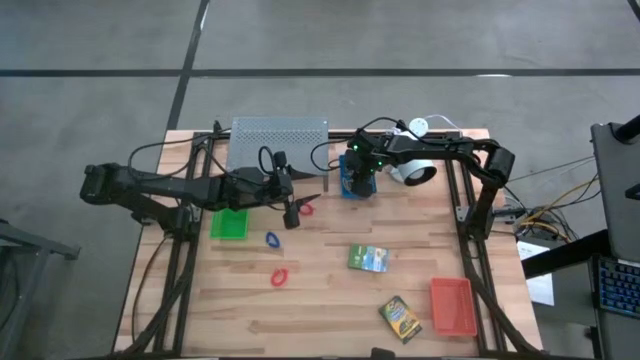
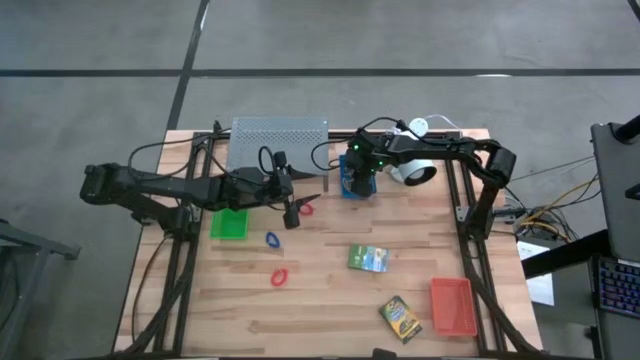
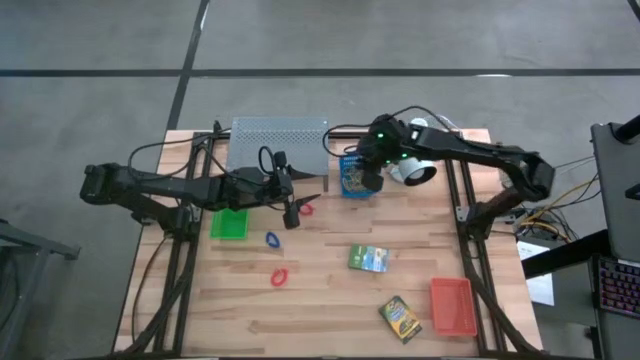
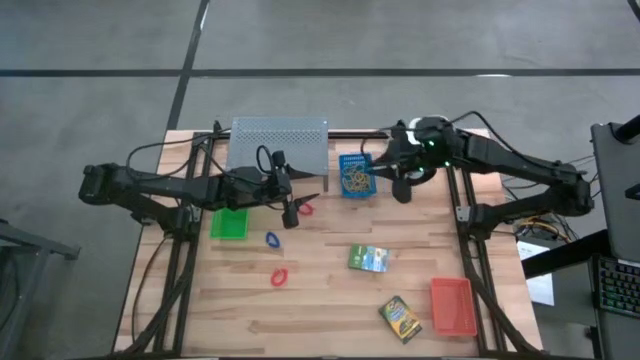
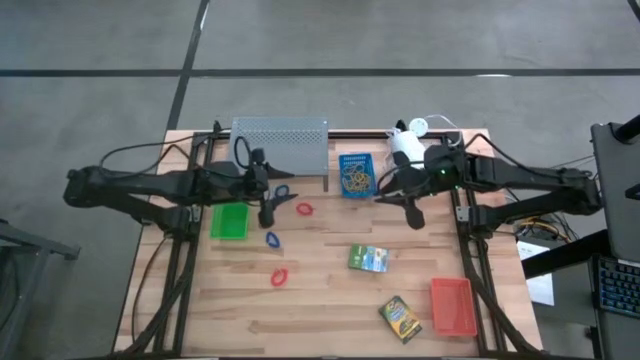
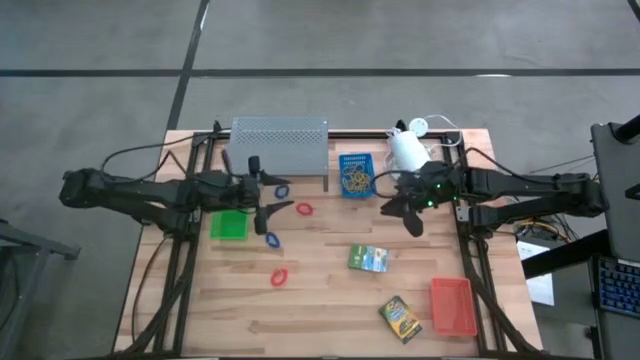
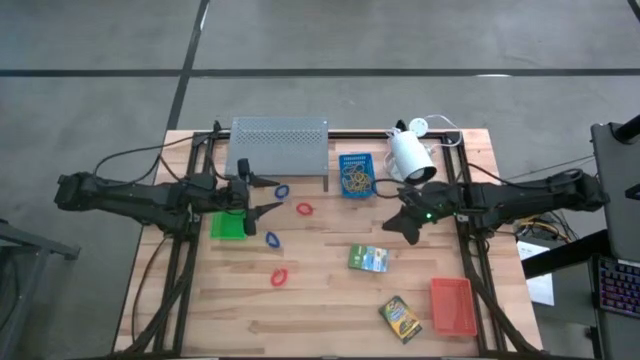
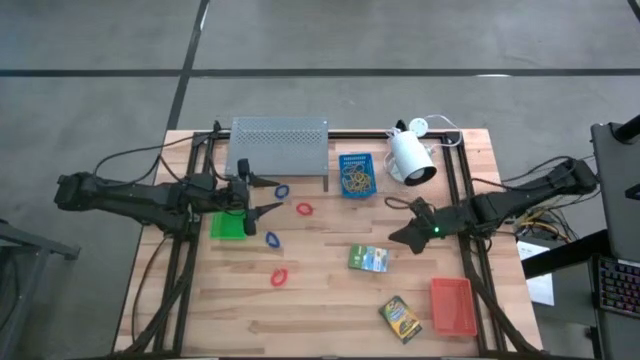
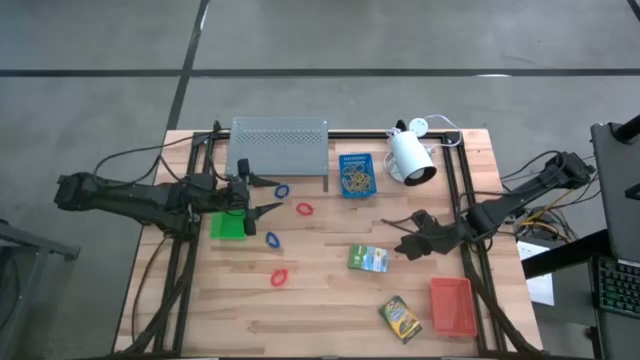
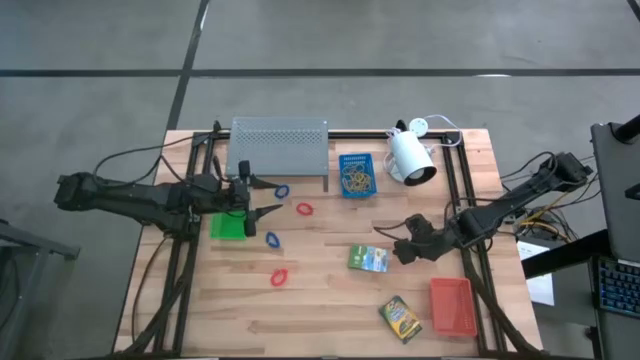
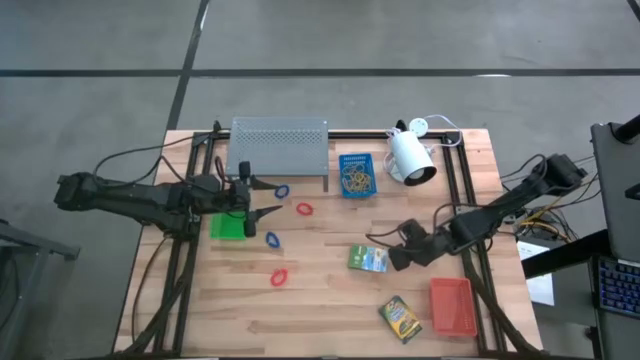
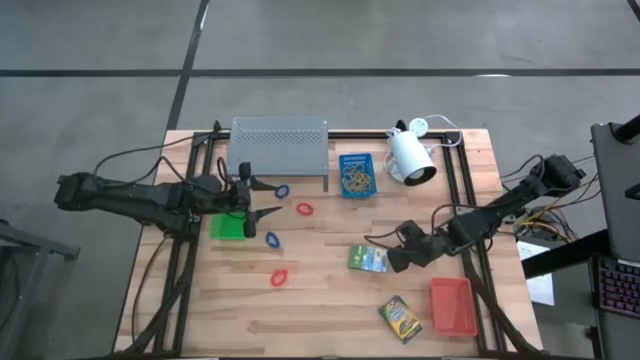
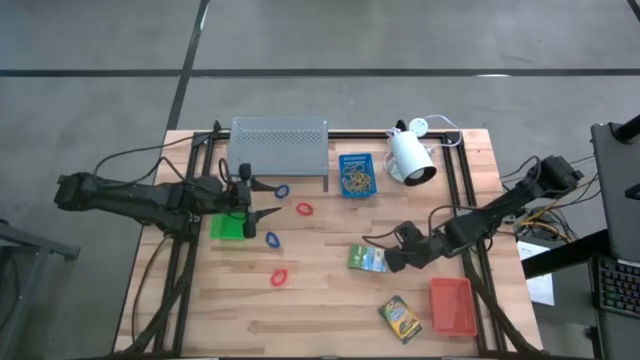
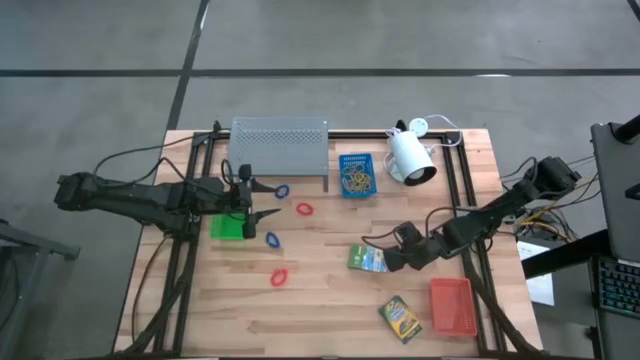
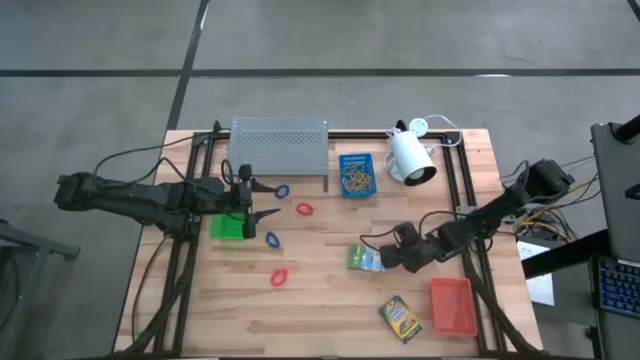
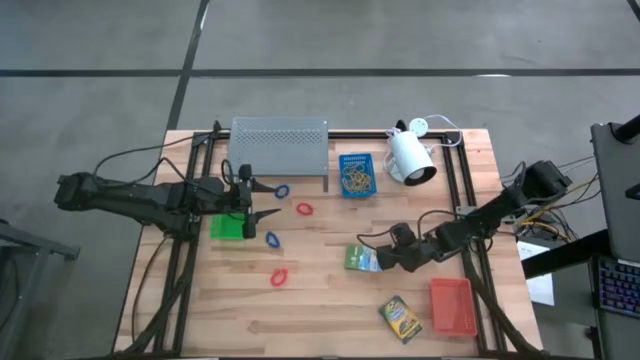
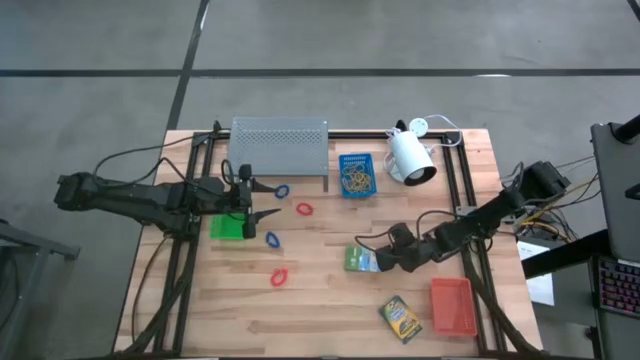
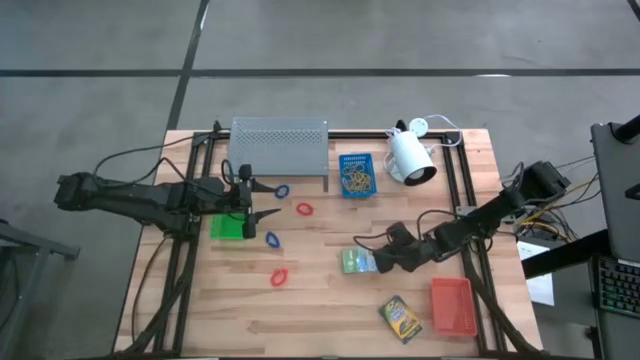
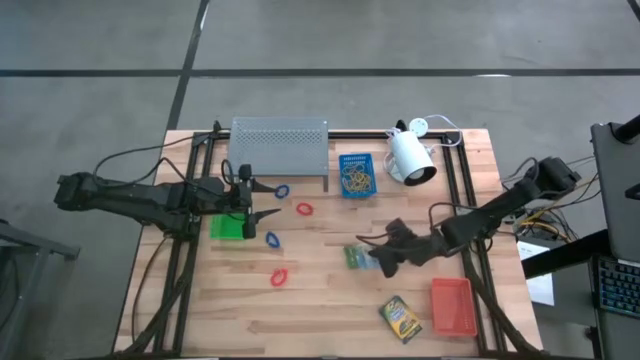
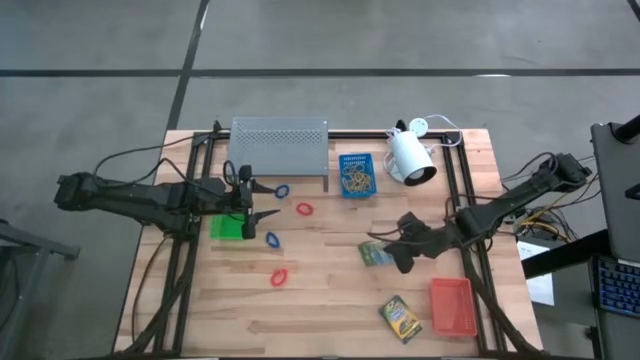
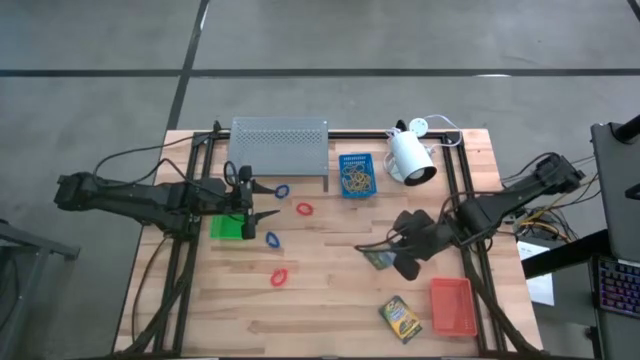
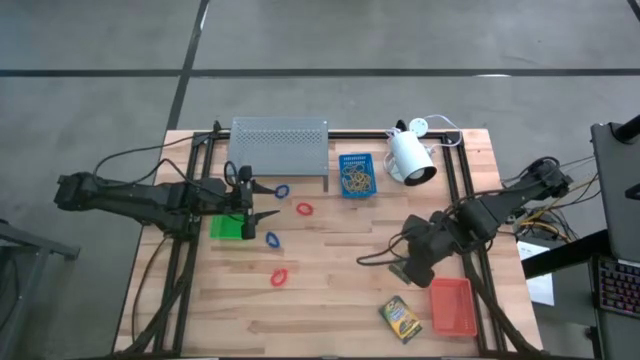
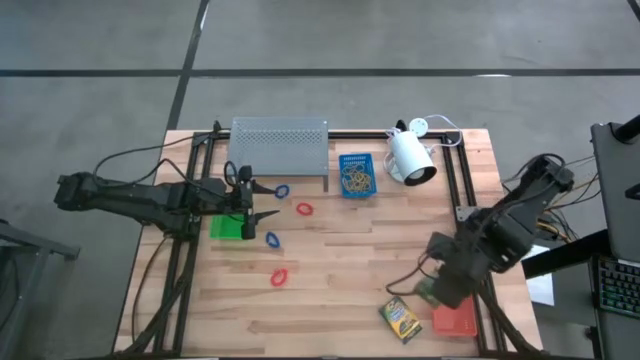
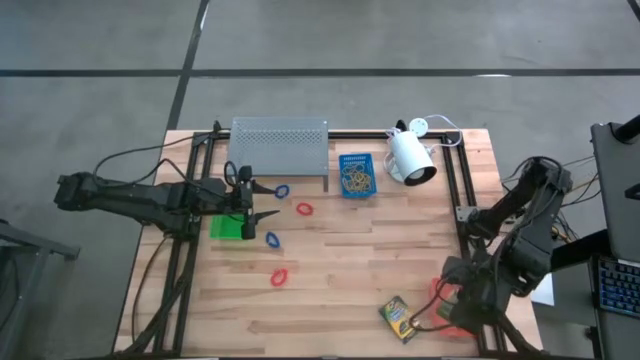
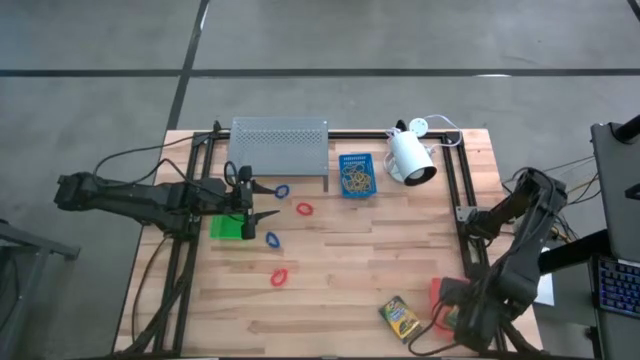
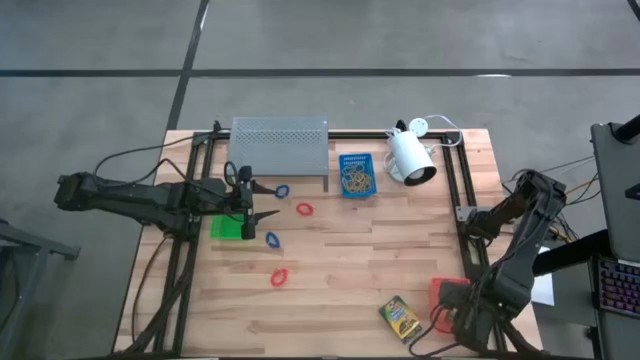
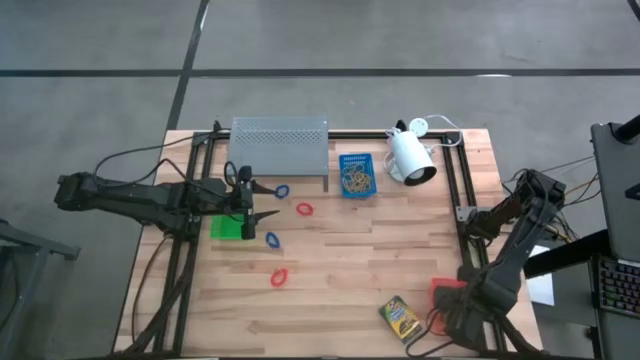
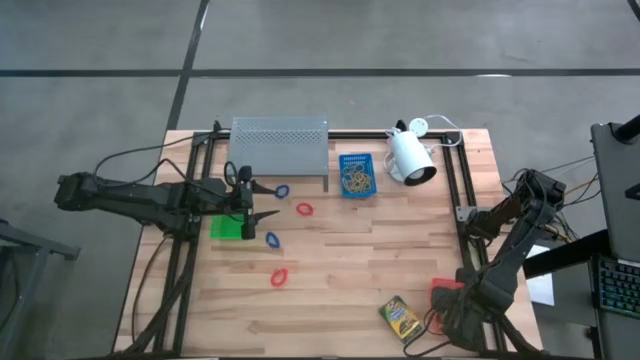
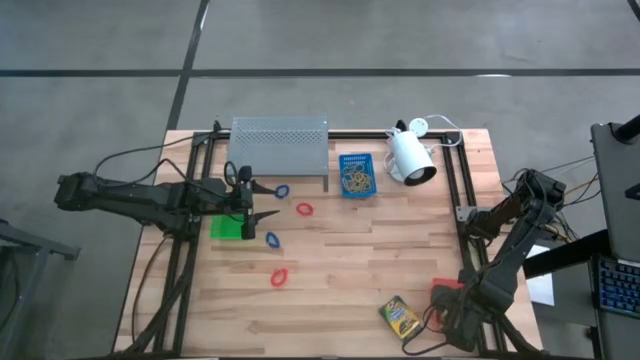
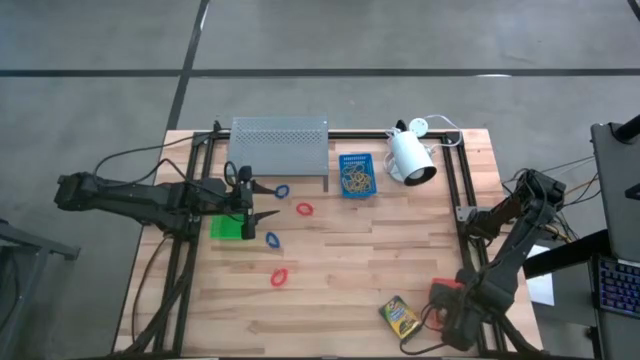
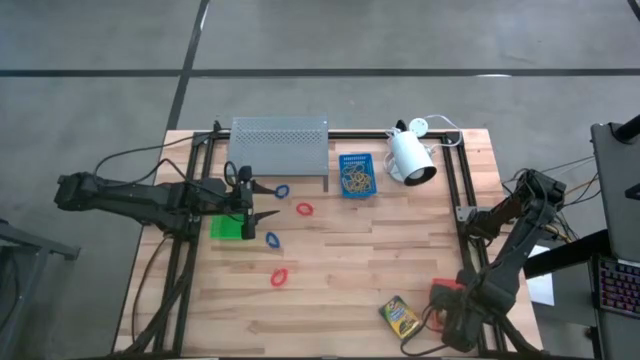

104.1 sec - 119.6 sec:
Task: Pick & Place Office Desk Supplies
Put the yellow crayon box into the orange bin

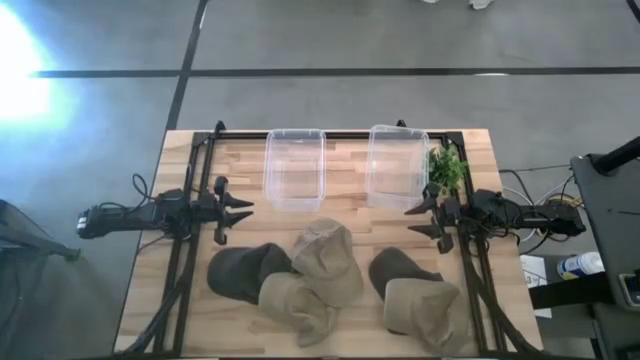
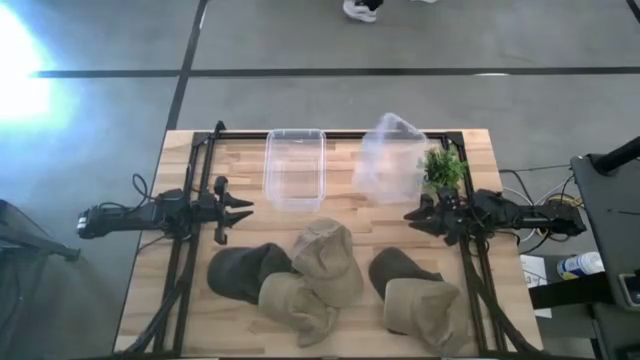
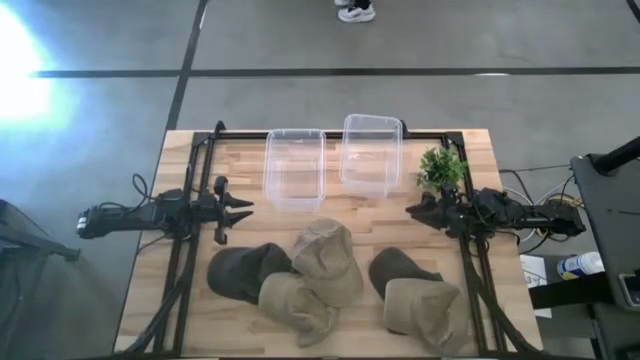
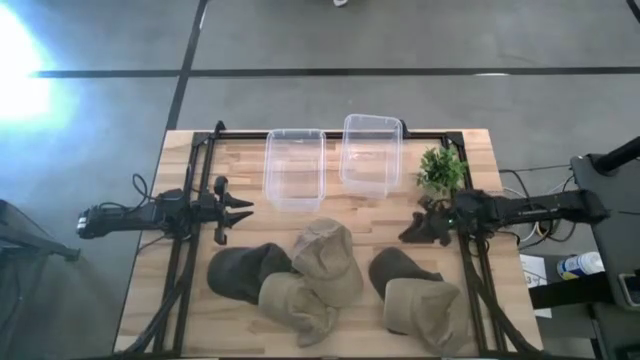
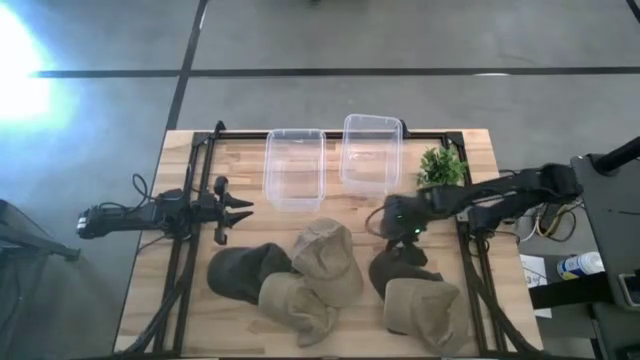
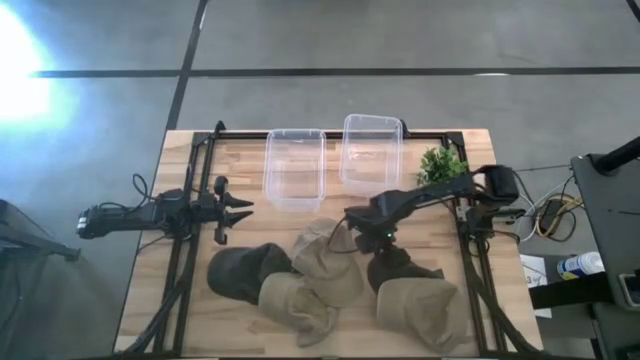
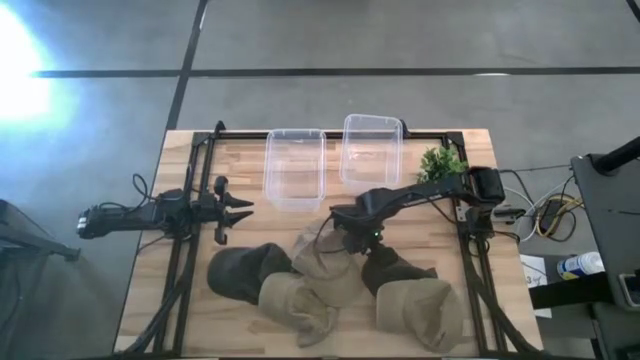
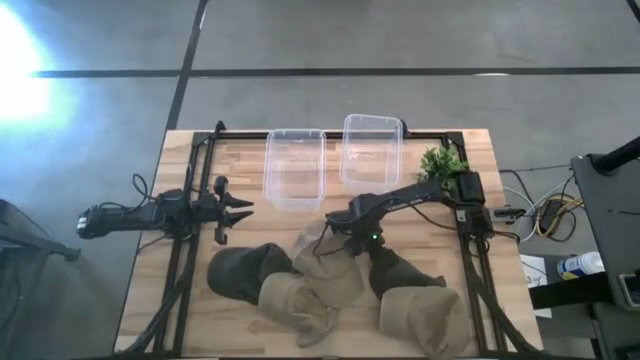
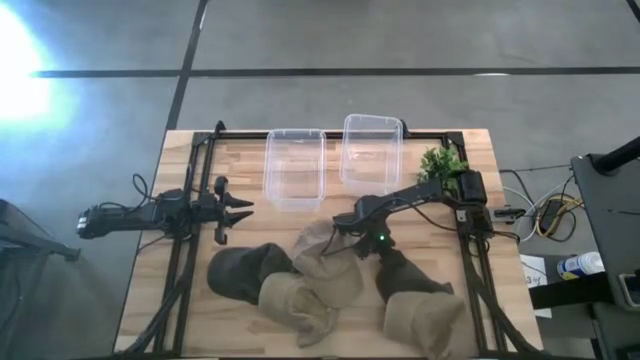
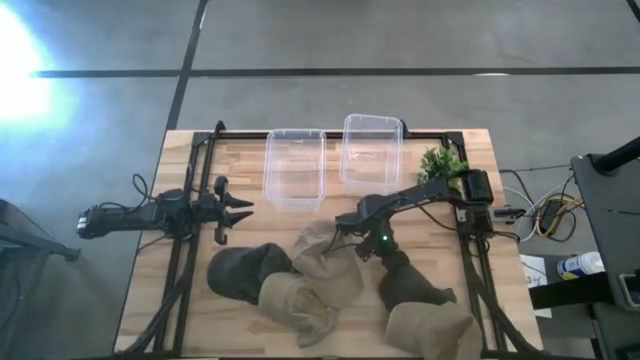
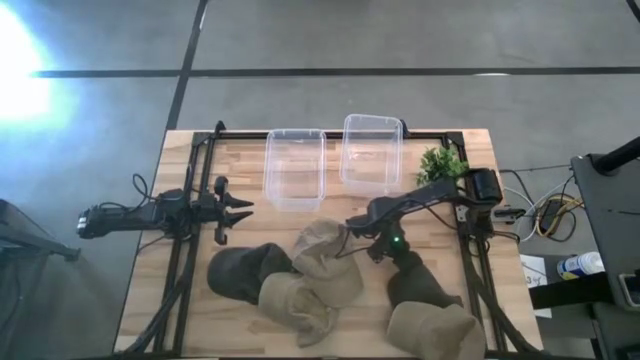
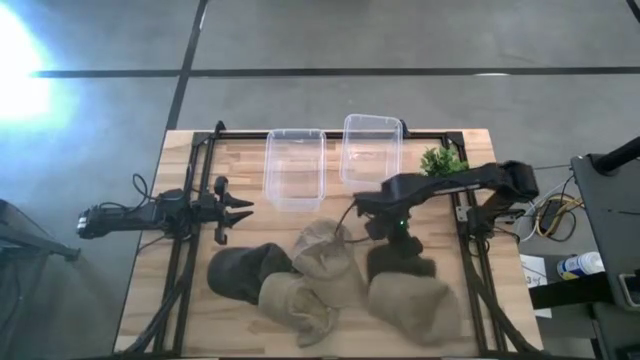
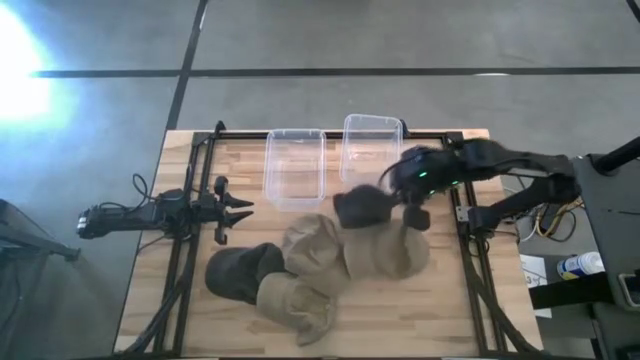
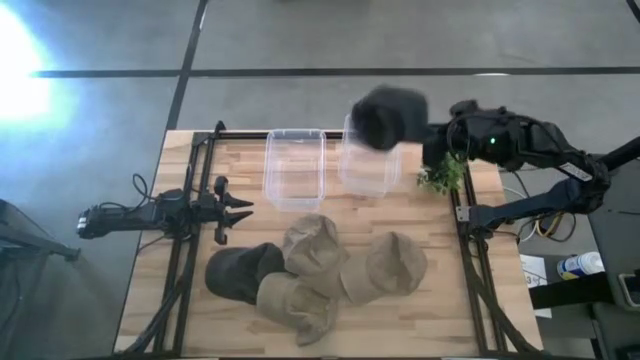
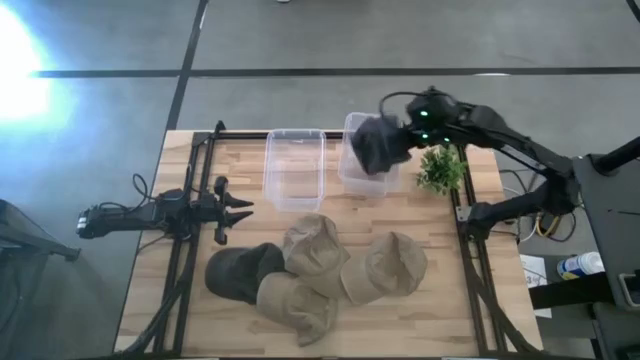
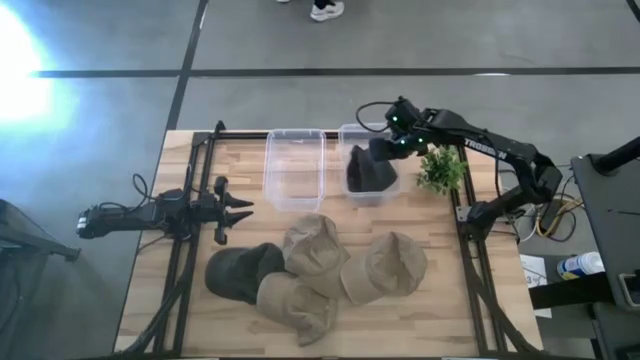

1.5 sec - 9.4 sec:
Task: Pick & Place hat
Put the right black cap into the right transparent bin
